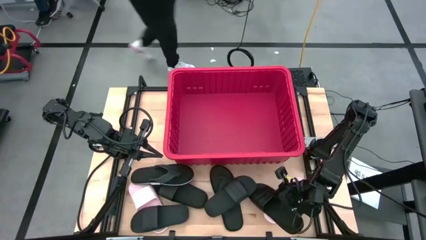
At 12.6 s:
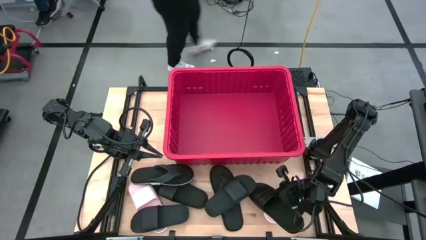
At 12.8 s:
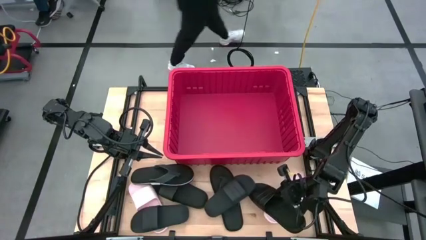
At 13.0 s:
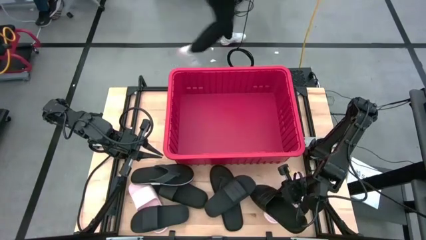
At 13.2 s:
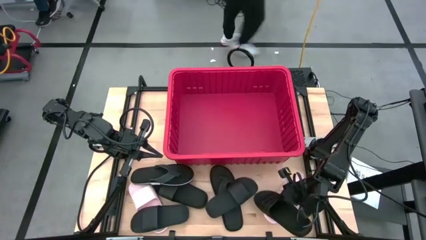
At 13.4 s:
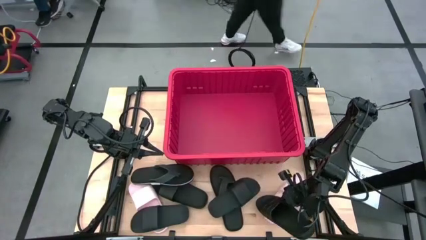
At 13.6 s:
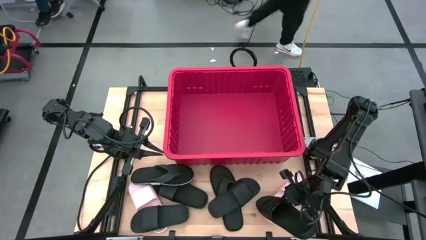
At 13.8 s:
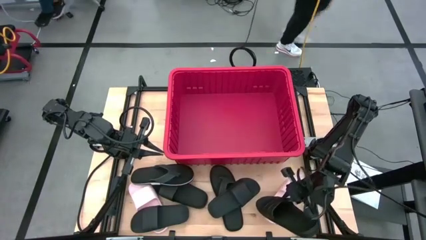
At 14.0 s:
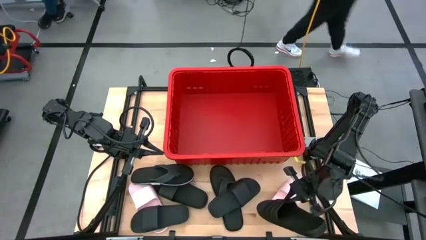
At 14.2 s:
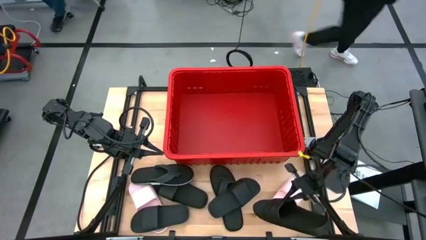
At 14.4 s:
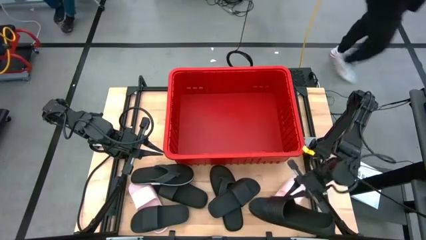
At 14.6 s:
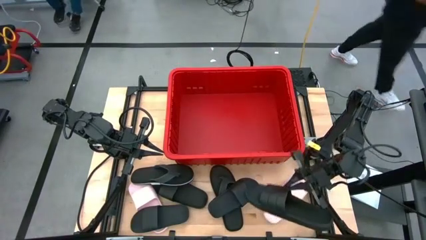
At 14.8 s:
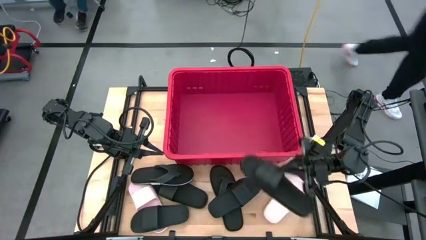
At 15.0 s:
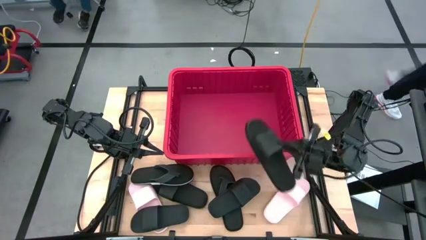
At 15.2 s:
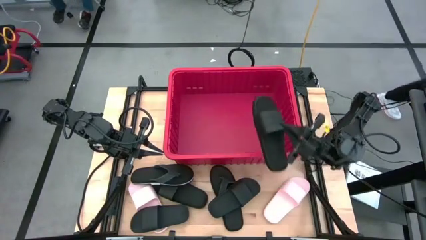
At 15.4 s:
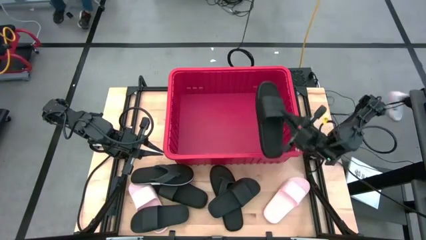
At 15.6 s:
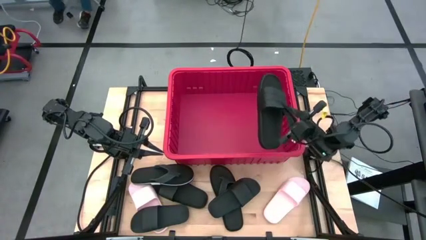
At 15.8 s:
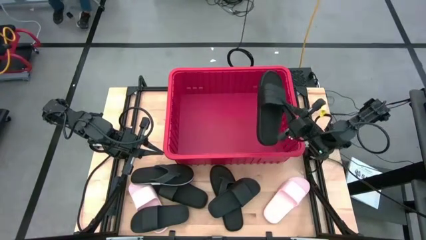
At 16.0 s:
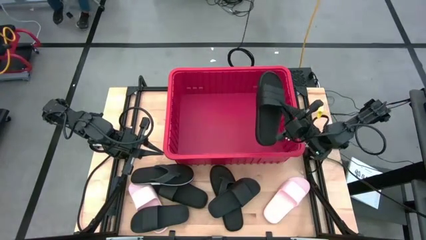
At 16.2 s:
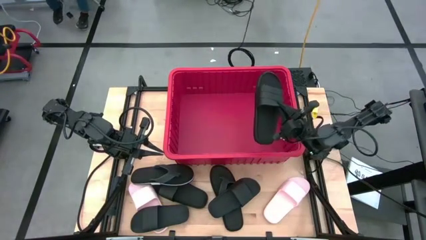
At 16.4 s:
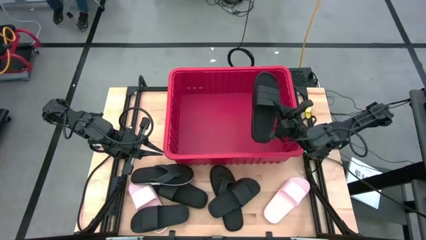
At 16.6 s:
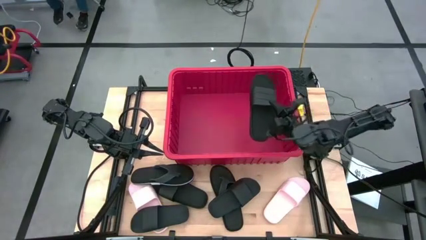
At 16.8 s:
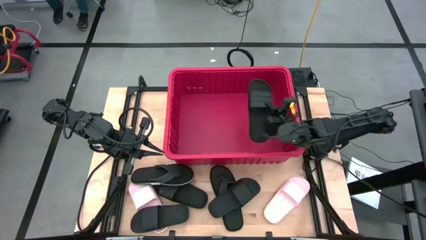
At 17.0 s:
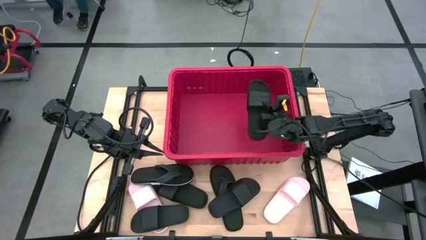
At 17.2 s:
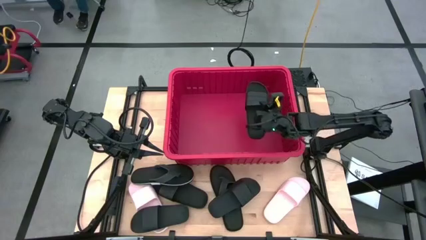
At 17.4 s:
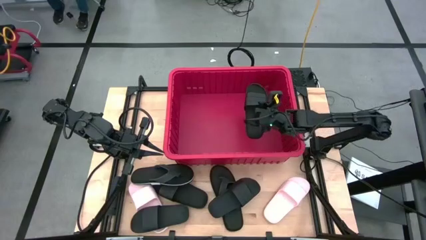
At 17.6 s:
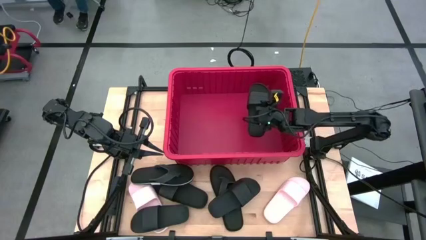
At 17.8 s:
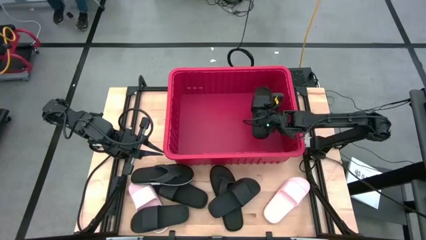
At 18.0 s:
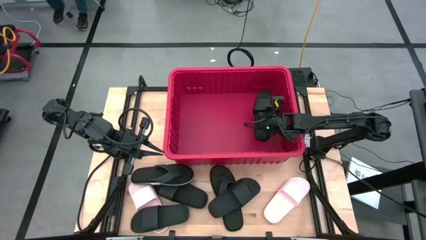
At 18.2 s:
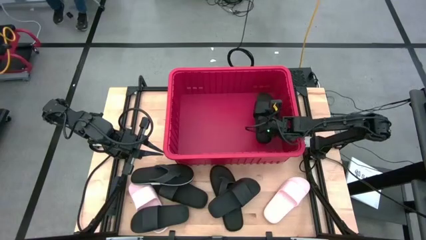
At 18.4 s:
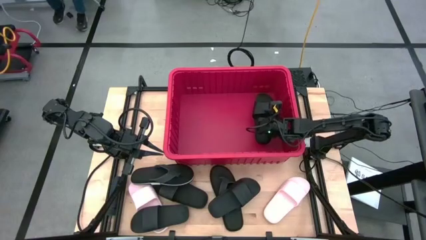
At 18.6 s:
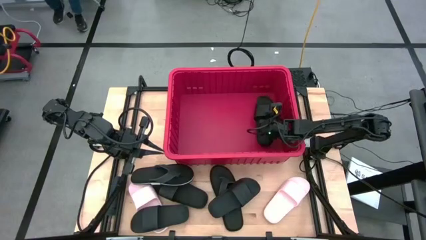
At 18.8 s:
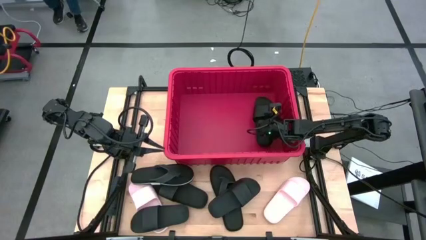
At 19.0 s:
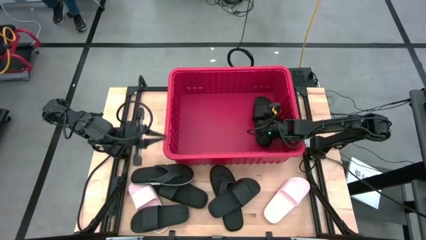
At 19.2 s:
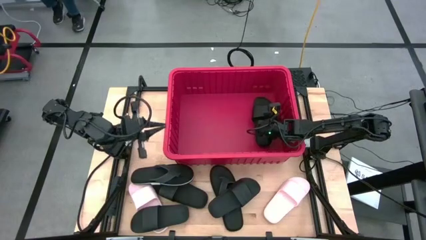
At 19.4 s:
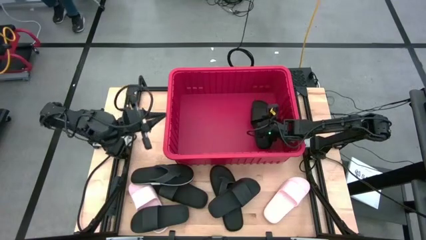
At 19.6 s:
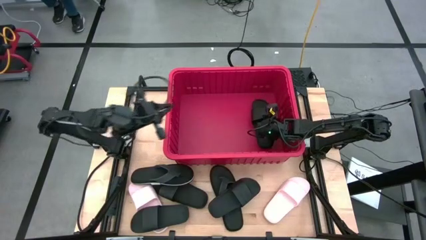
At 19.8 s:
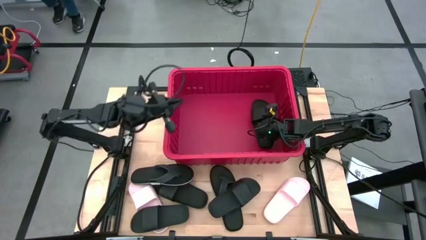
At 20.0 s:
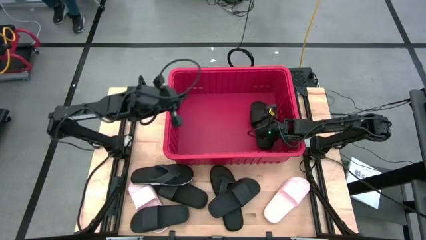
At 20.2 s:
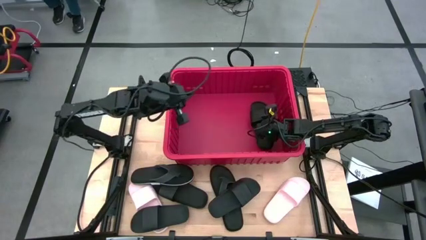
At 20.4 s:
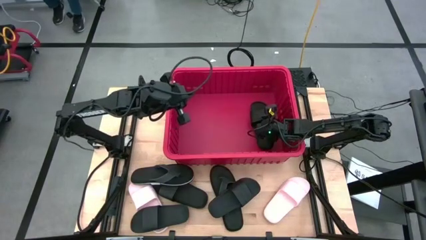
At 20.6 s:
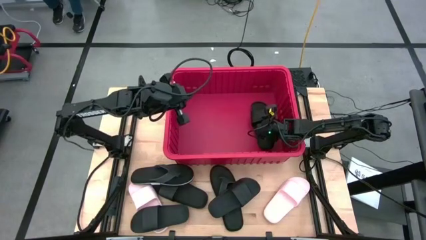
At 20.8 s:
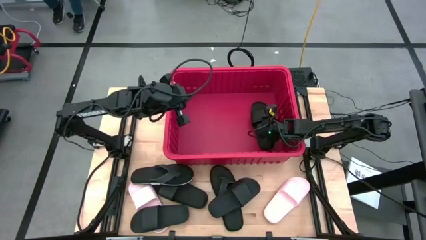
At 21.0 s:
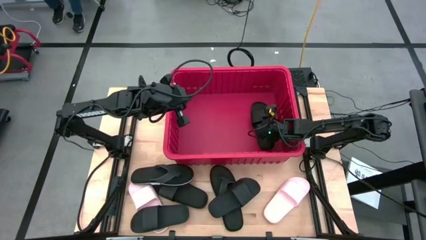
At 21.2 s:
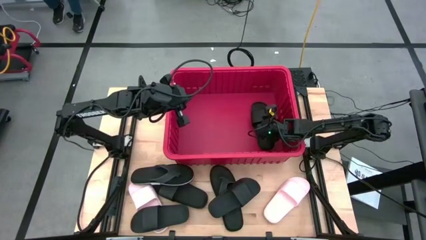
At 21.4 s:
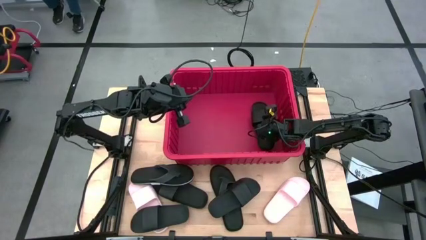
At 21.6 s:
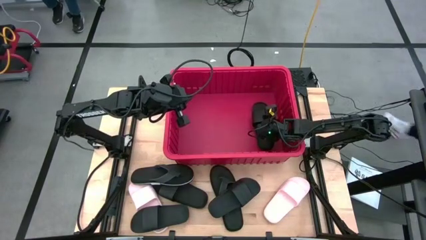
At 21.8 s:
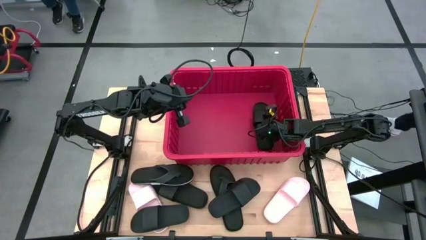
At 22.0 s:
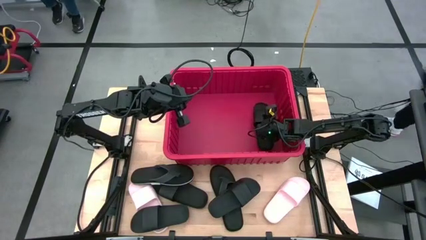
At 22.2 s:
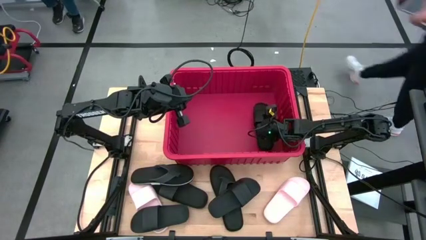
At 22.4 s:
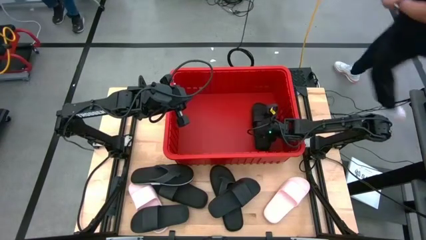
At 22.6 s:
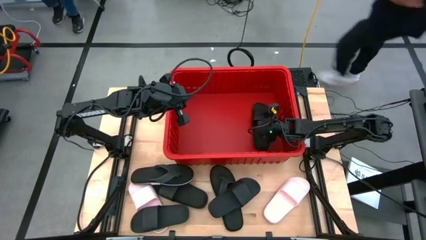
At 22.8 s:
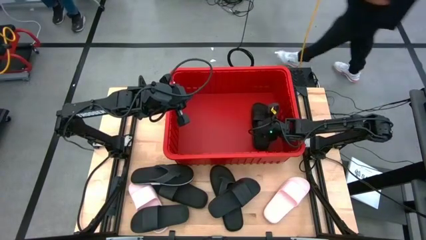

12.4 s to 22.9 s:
Task: Pick and place slides into bin
Put the black slide into the red bin

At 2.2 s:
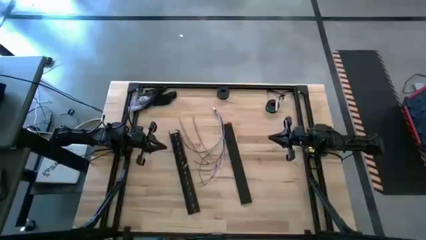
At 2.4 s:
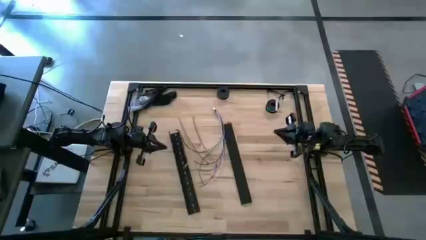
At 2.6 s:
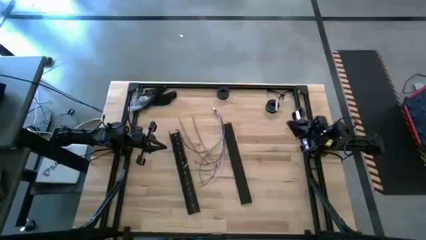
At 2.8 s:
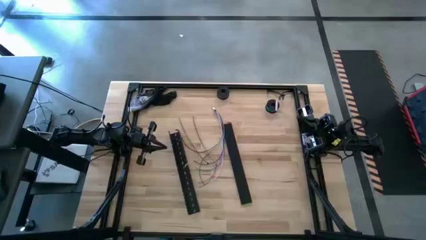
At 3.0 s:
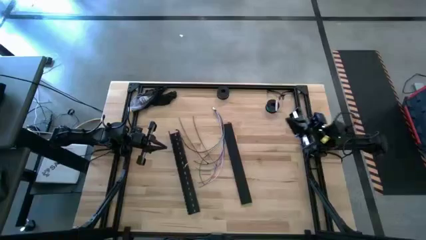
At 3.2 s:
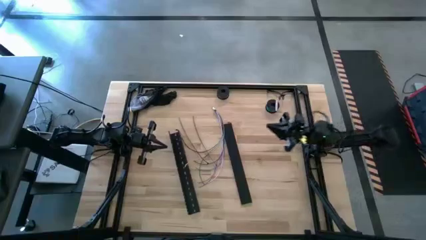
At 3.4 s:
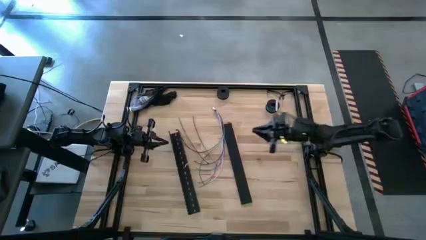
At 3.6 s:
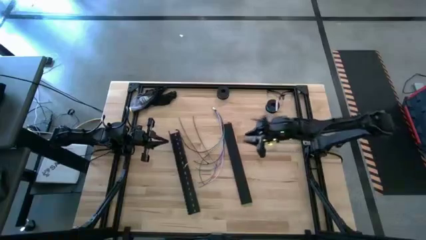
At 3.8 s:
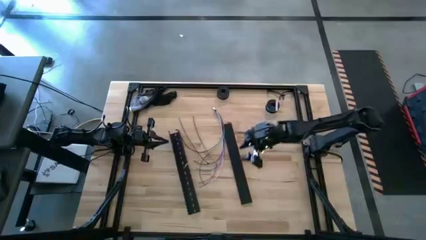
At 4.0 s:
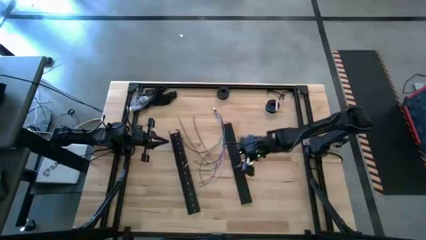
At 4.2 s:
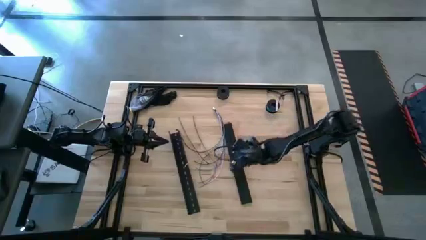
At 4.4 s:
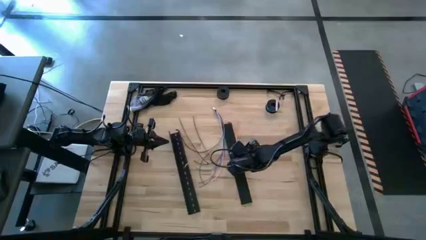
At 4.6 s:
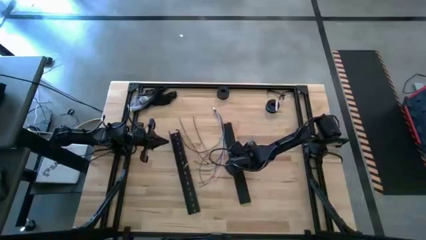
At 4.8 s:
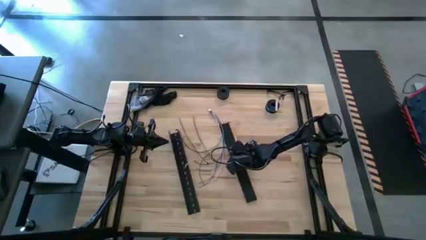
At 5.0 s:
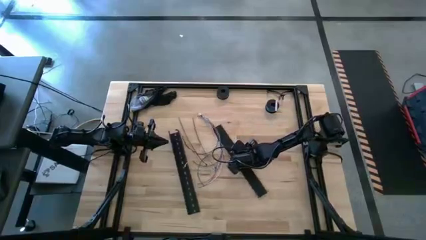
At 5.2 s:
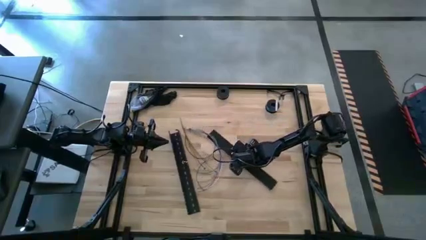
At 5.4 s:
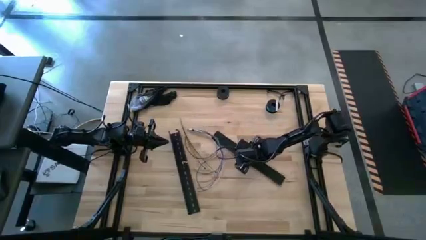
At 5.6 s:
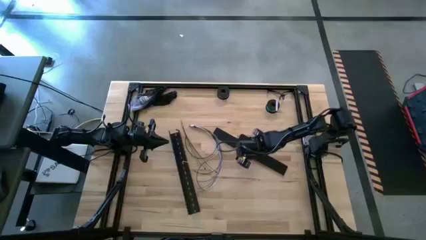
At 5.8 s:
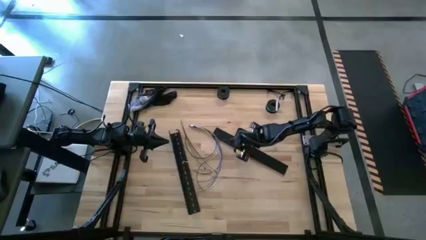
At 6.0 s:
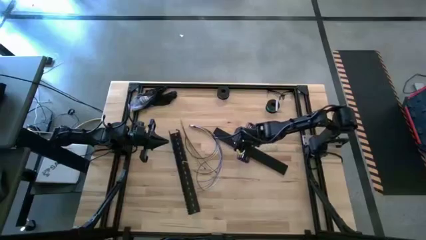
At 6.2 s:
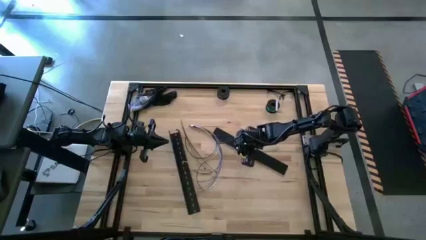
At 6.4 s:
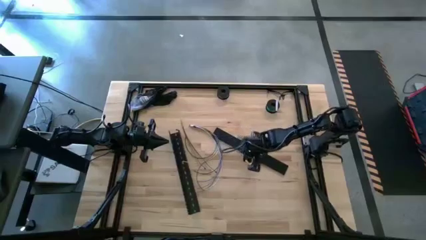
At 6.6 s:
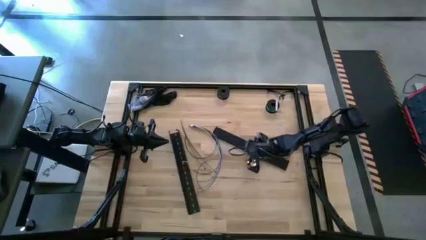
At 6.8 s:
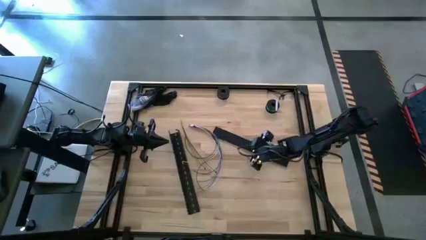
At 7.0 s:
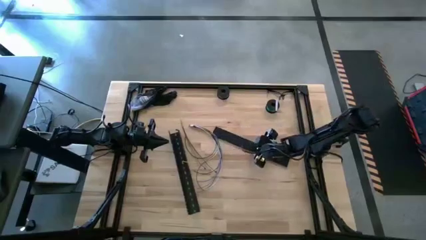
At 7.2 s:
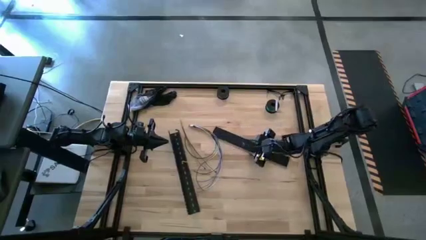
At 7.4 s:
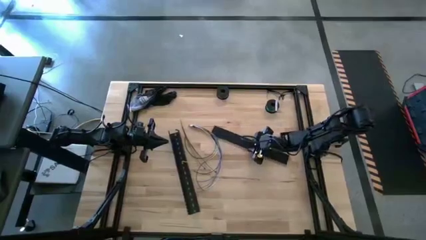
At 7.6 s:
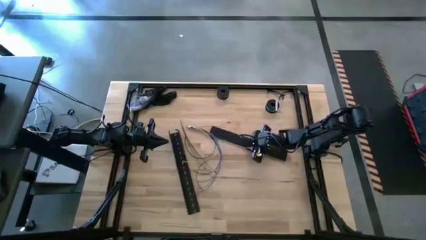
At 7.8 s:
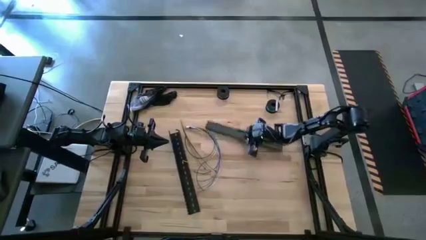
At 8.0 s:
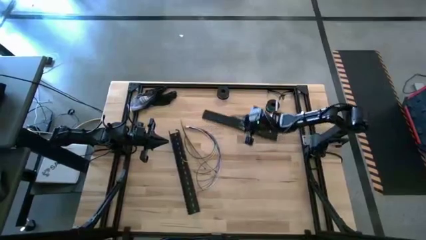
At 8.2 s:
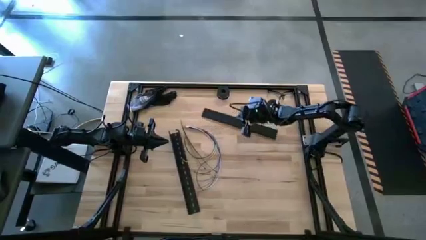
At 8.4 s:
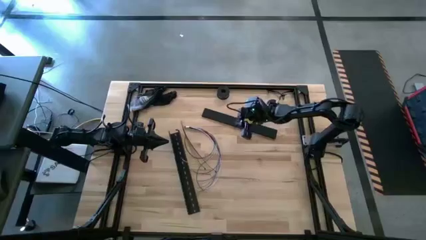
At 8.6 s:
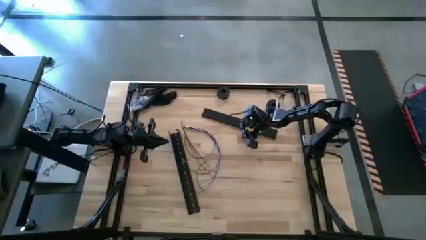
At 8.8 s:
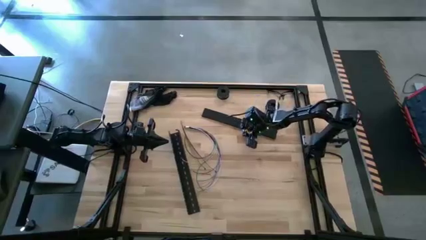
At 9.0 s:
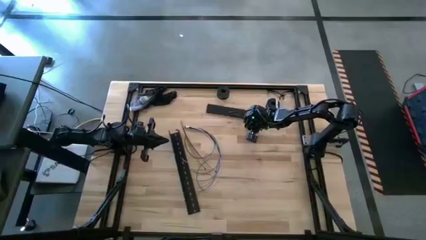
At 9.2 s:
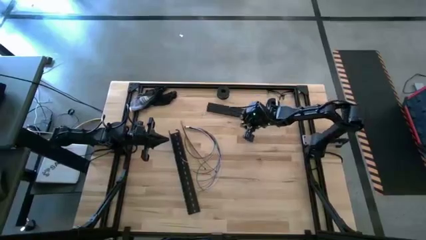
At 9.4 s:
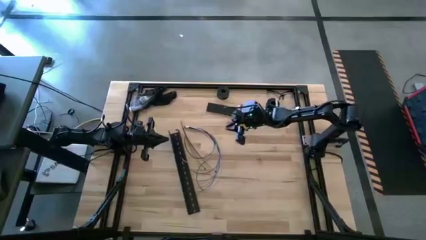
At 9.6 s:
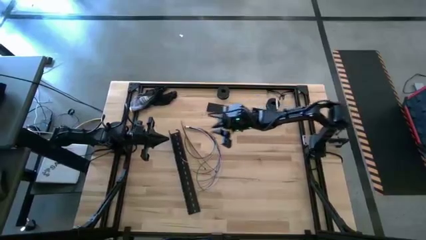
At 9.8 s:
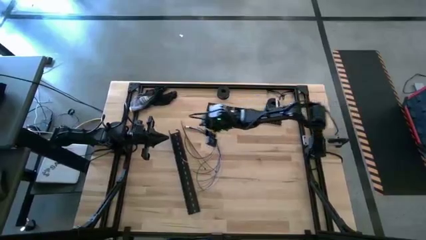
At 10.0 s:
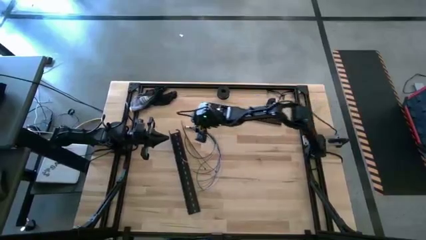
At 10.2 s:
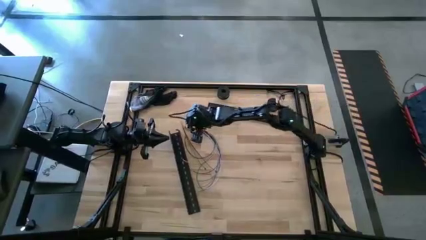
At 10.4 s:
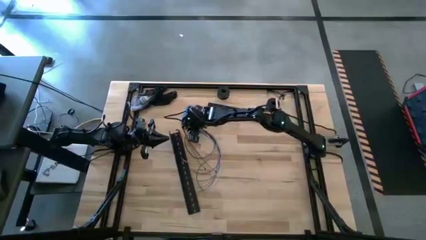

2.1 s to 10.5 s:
Task: Ziptie cables
Move the cable duct cover to the top of the table
